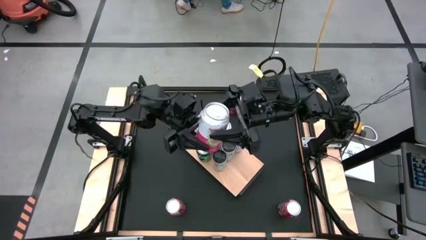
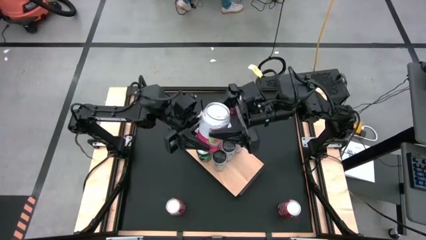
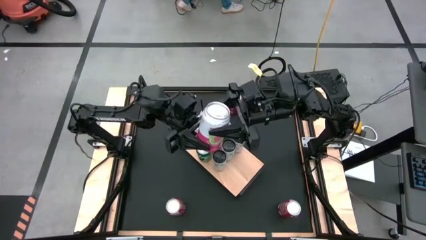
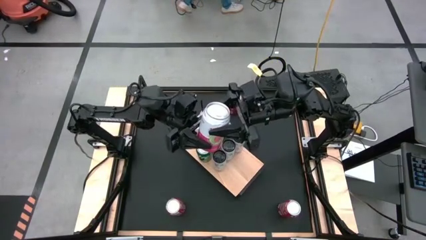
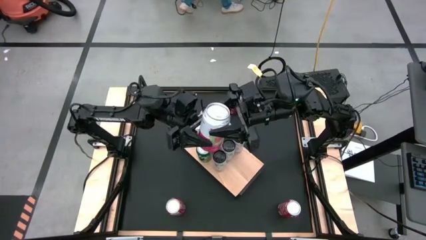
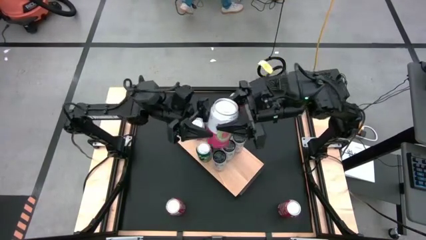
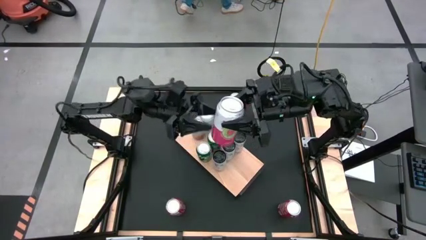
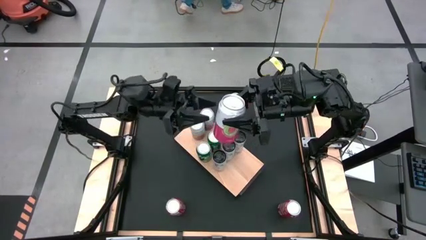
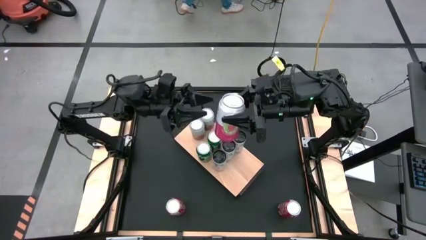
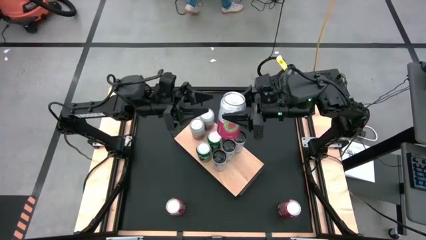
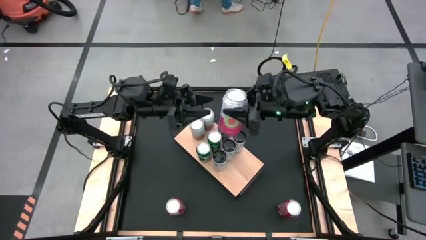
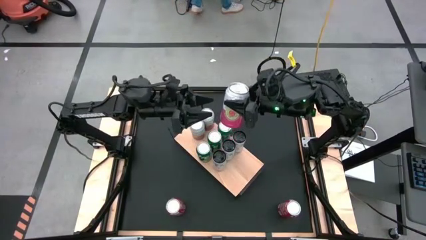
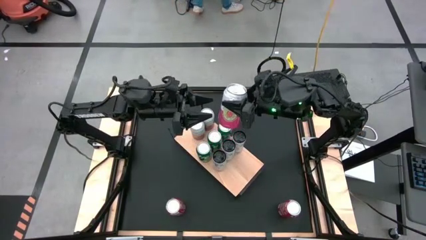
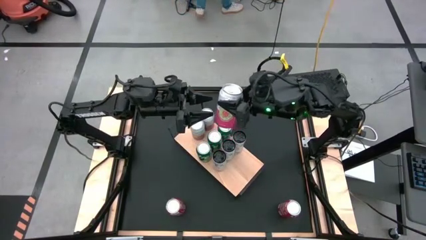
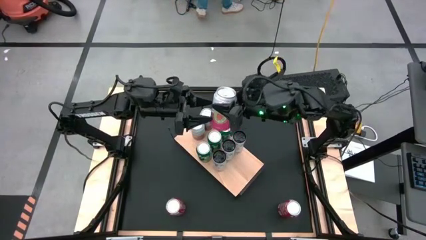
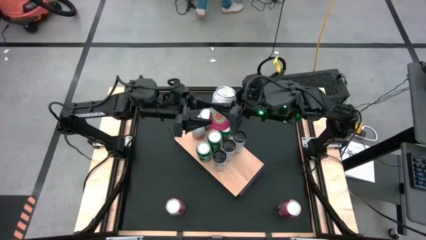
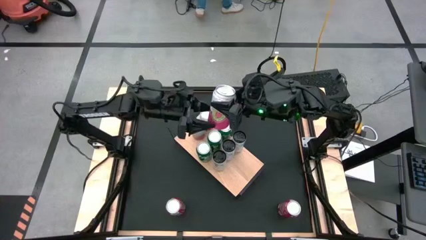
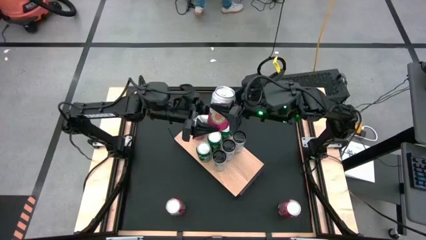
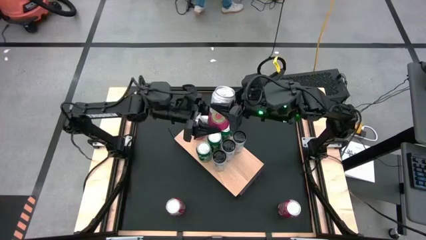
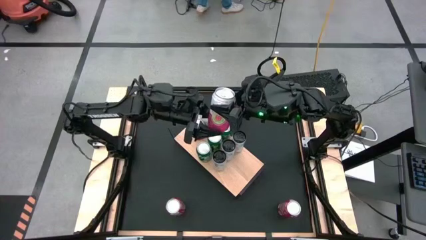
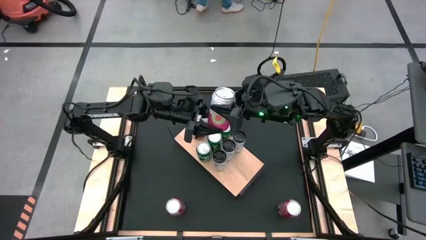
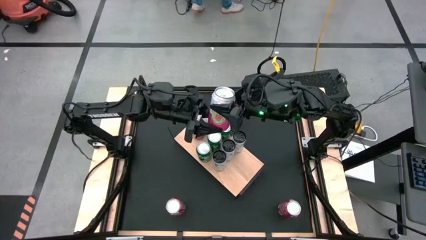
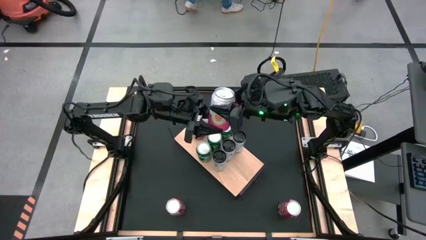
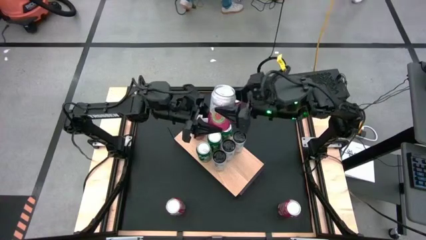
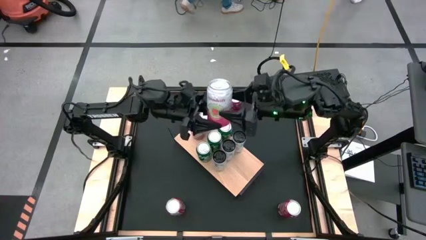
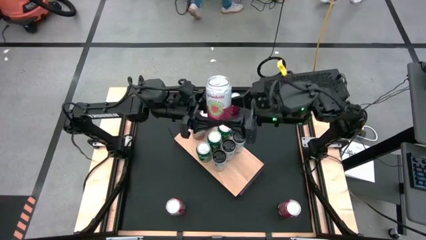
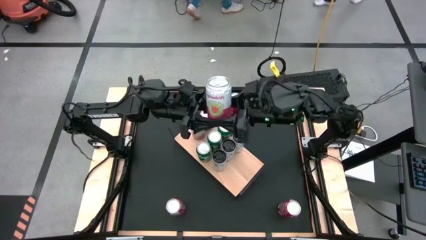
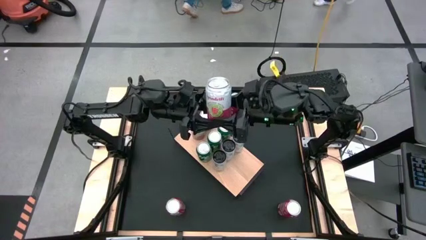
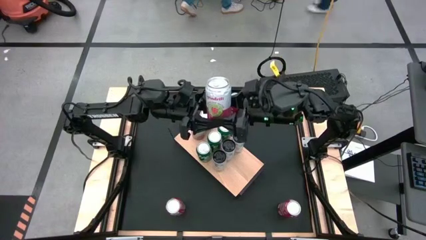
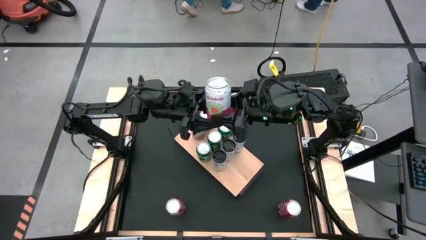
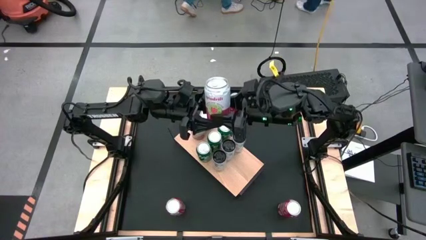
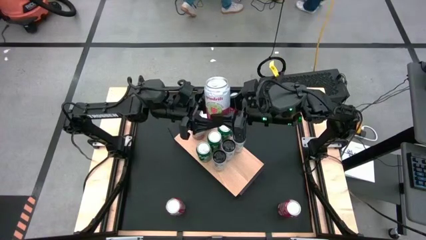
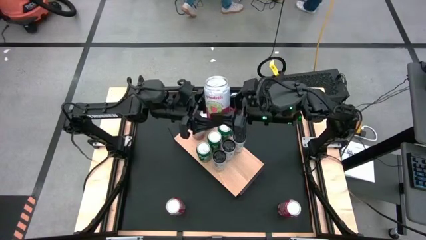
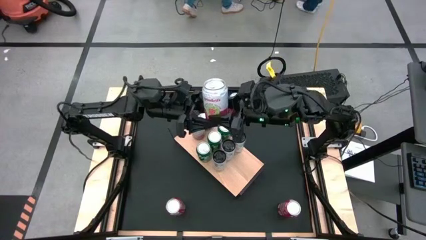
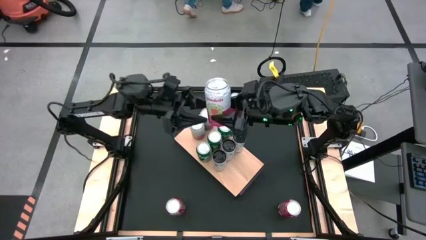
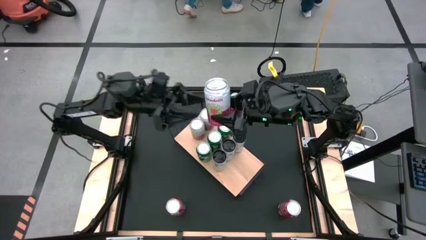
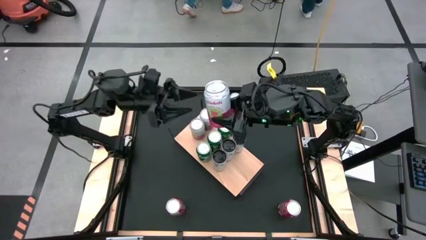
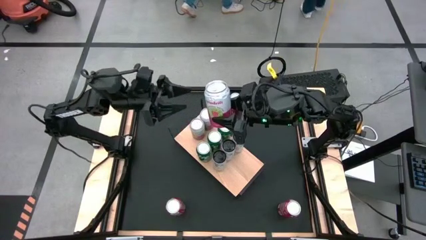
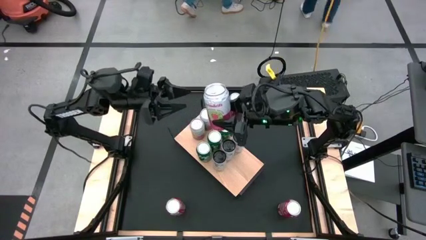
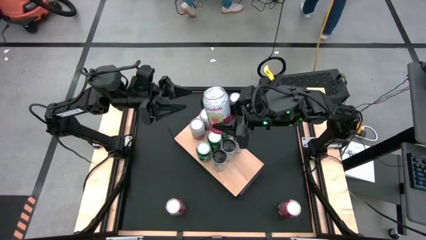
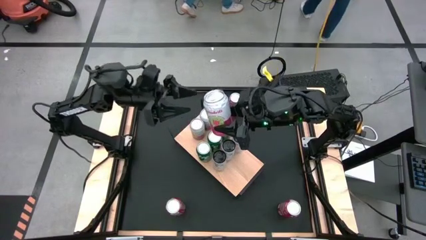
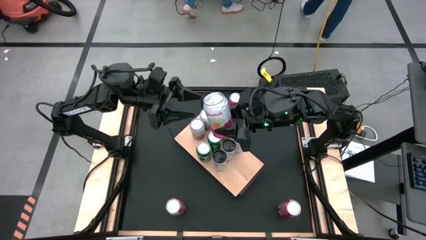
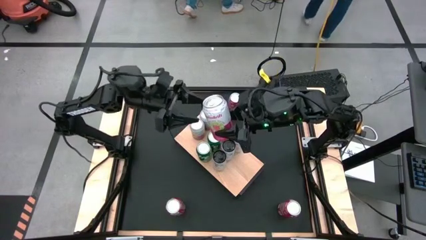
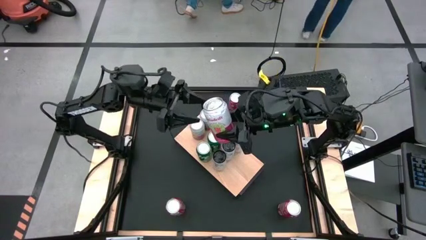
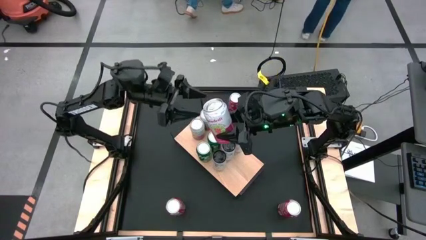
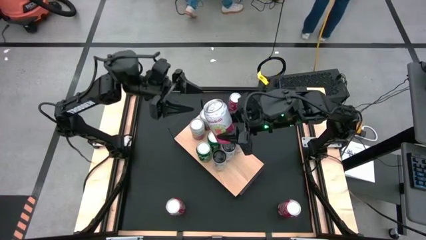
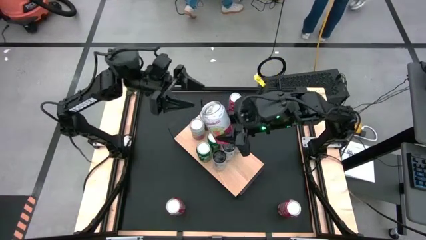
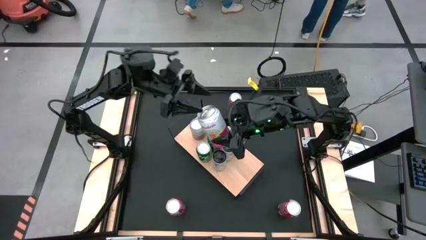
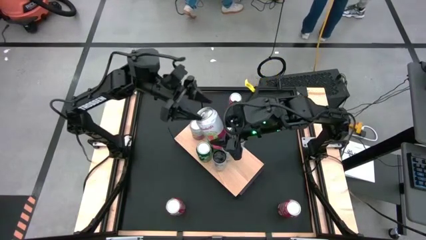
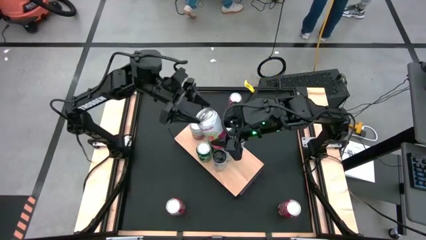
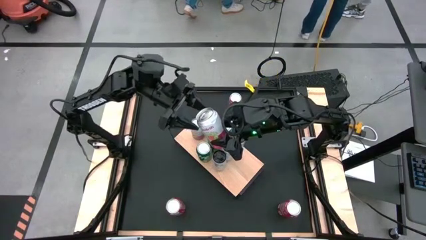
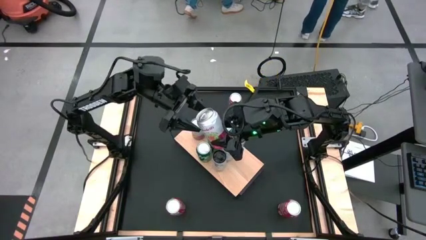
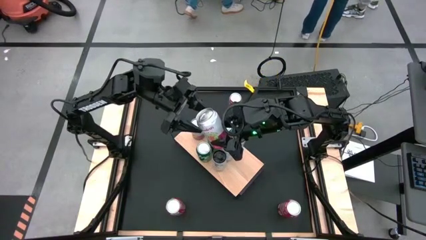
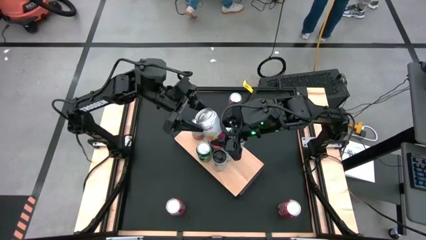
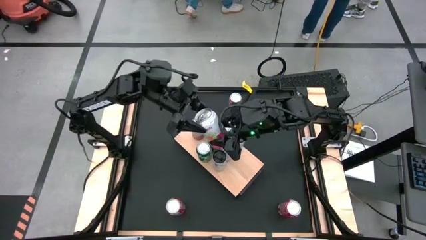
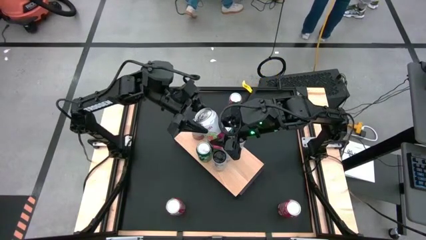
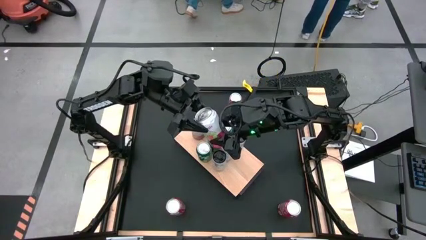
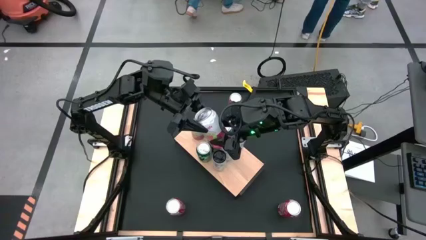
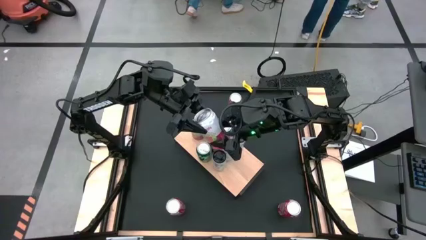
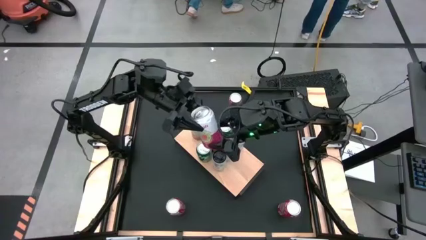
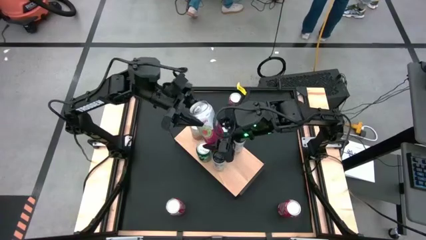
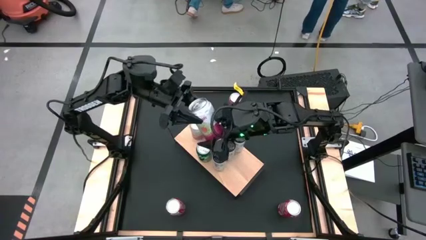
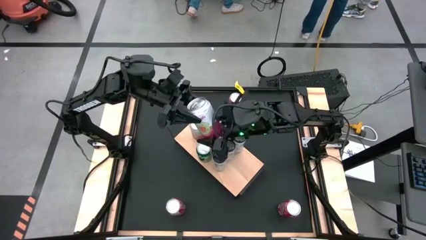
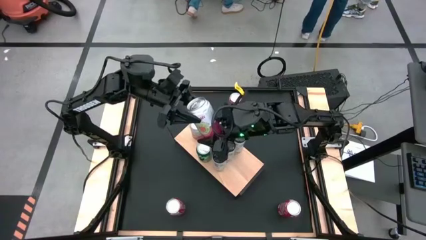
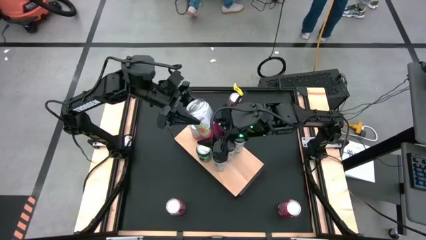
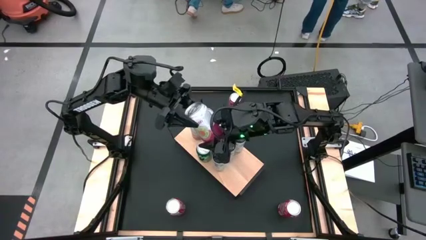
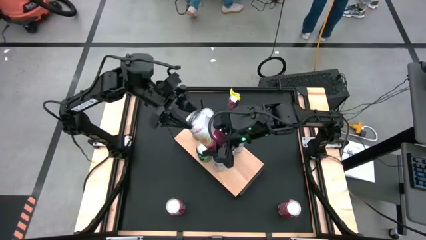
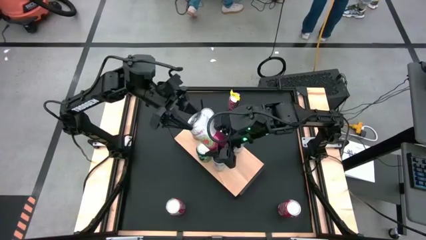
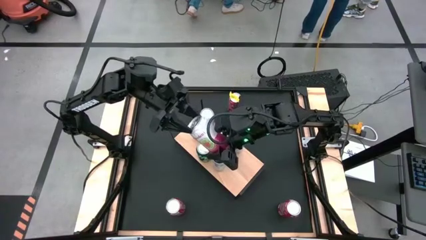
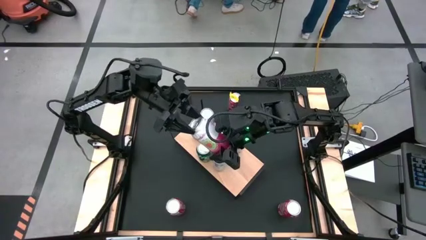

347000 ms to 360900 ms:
Task: Place canned beverage on shelf
Put the white and pink soda can aligned with the other white and pink soda cans
